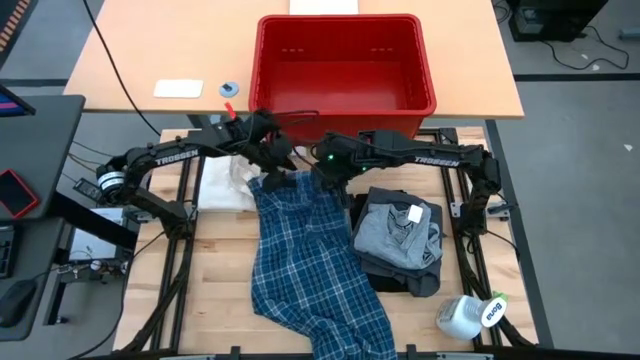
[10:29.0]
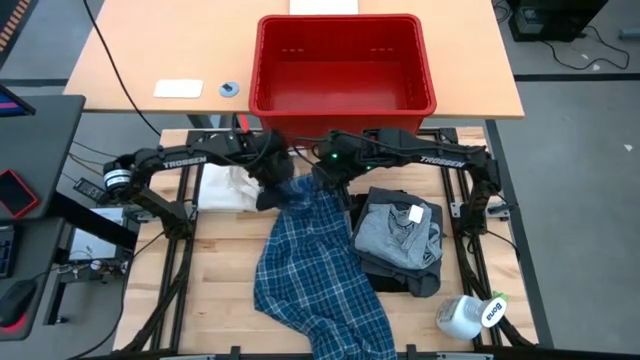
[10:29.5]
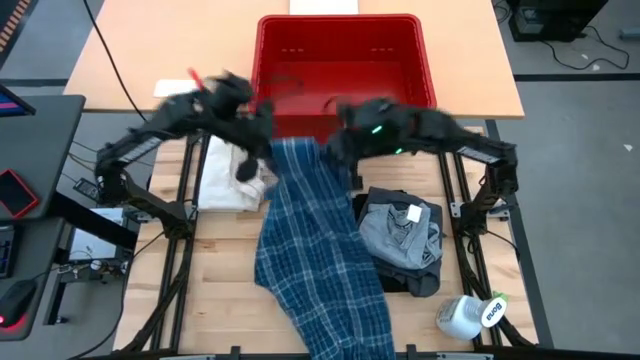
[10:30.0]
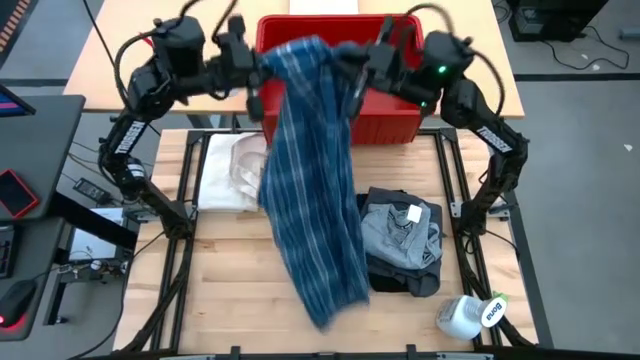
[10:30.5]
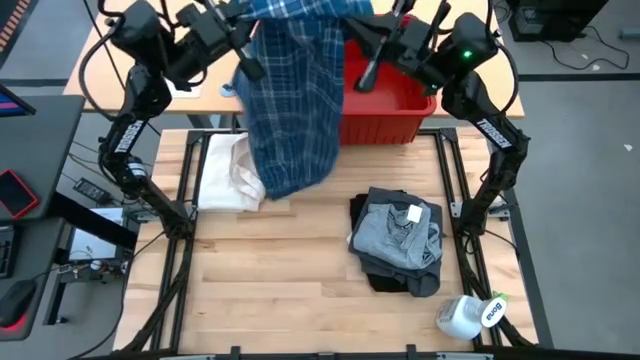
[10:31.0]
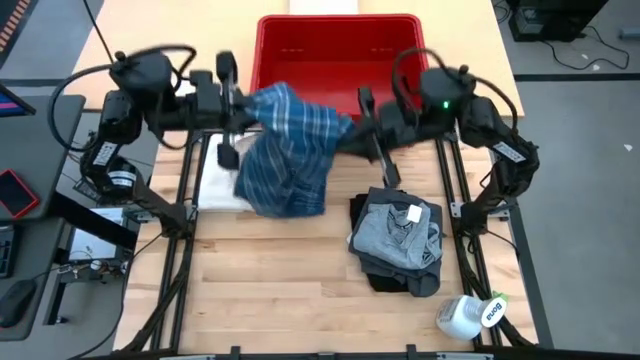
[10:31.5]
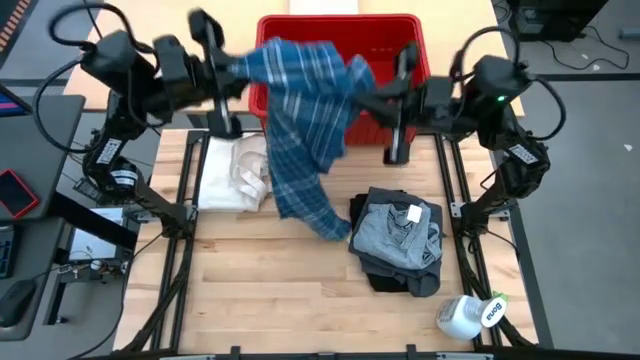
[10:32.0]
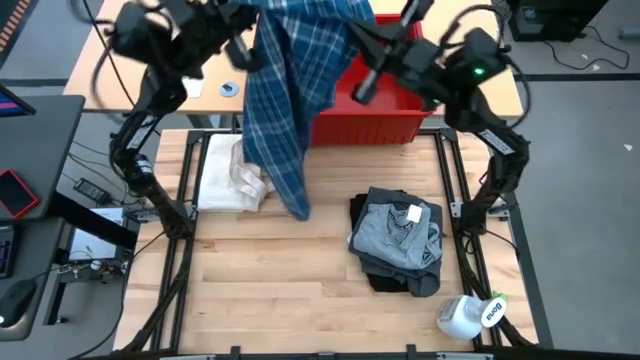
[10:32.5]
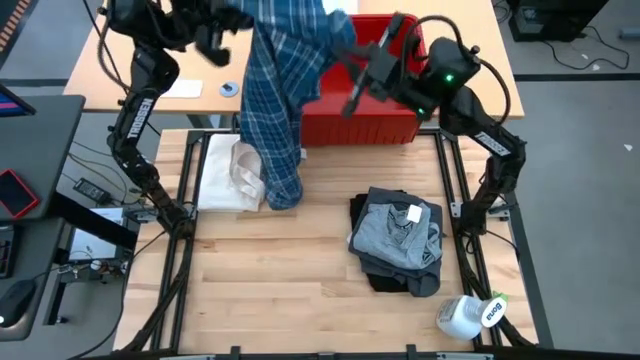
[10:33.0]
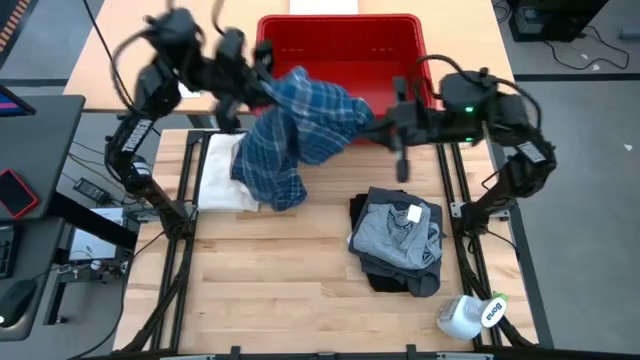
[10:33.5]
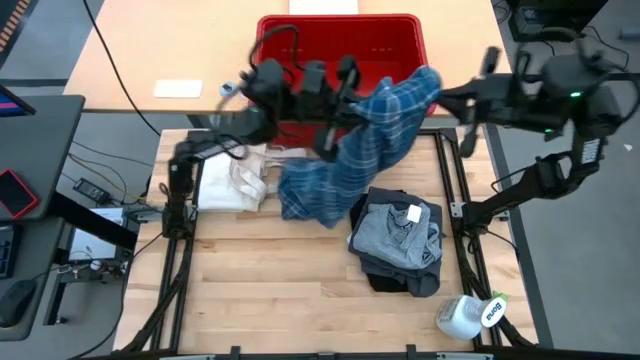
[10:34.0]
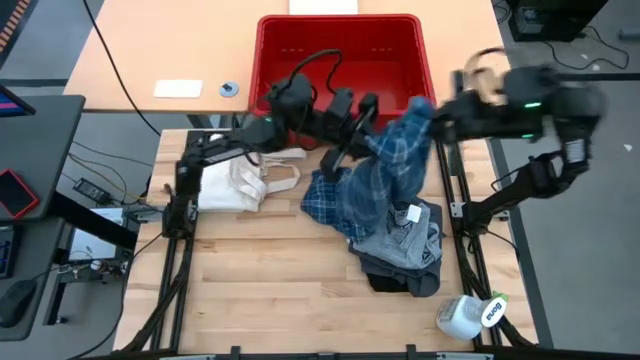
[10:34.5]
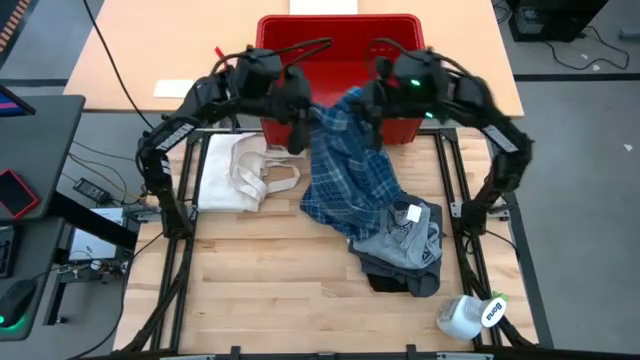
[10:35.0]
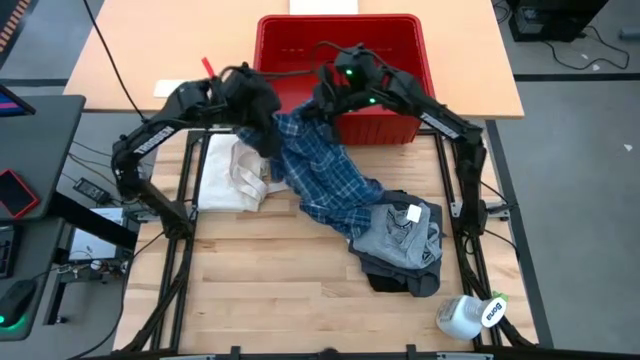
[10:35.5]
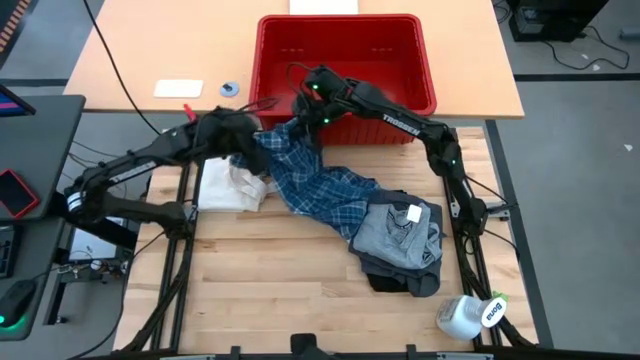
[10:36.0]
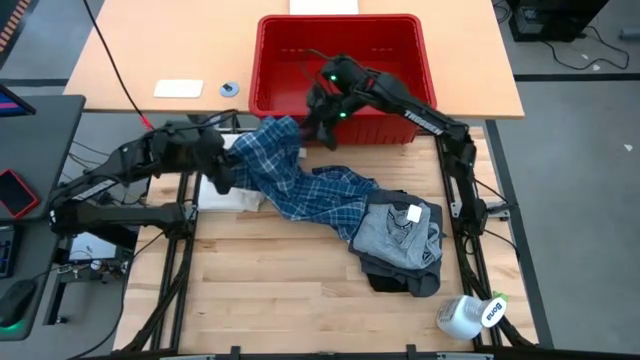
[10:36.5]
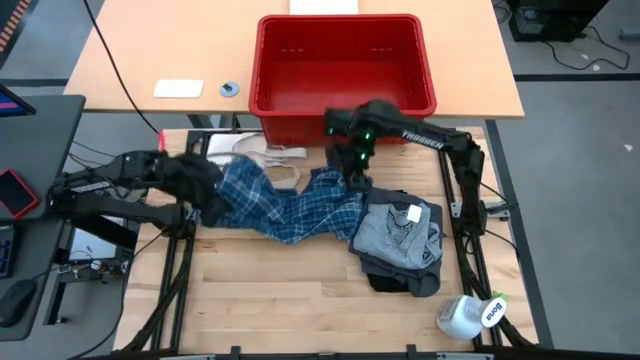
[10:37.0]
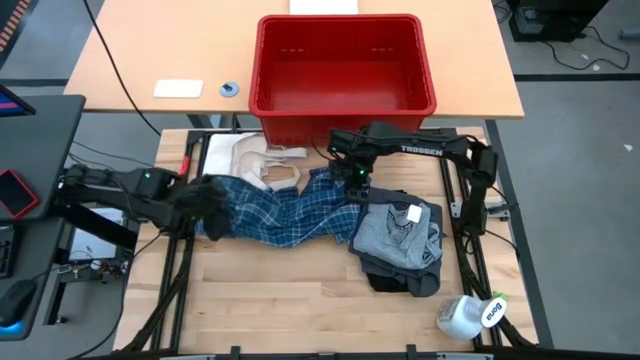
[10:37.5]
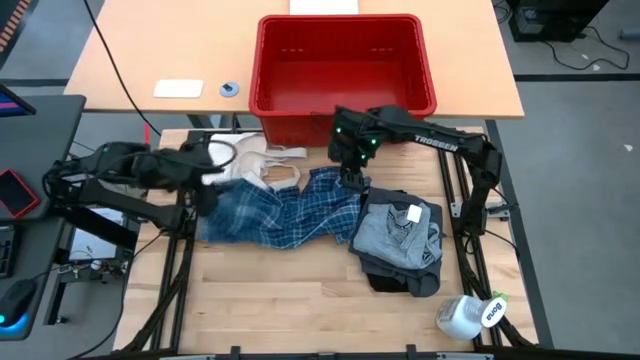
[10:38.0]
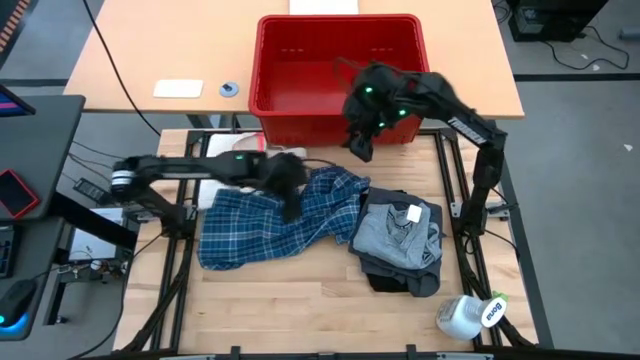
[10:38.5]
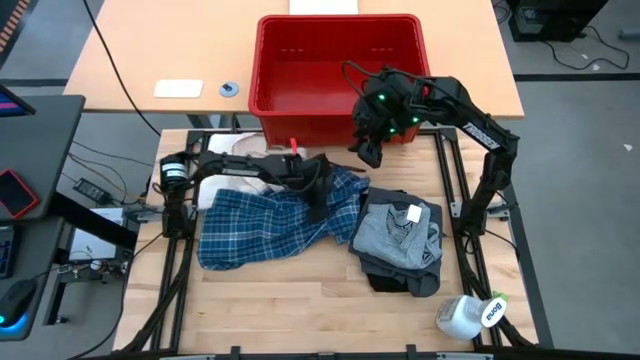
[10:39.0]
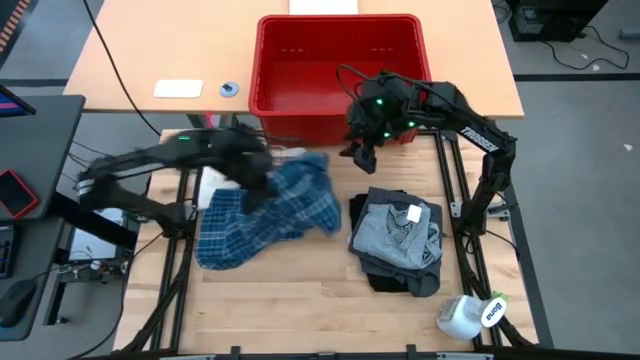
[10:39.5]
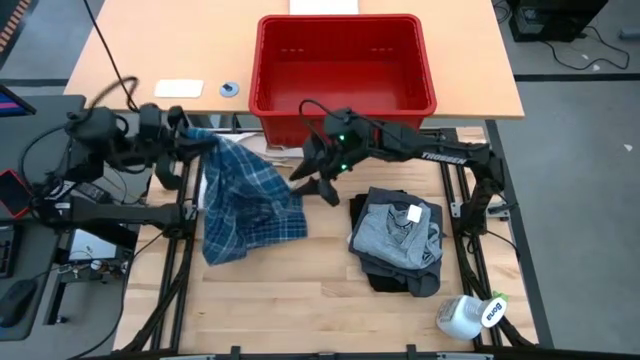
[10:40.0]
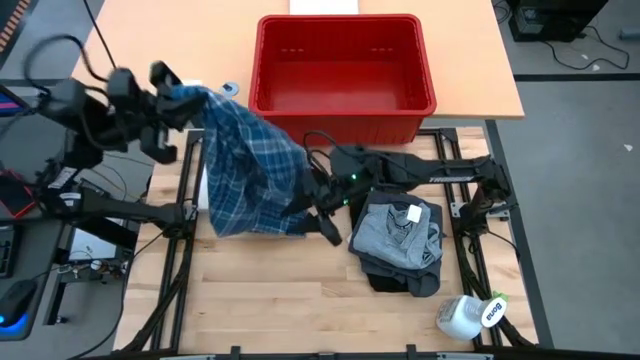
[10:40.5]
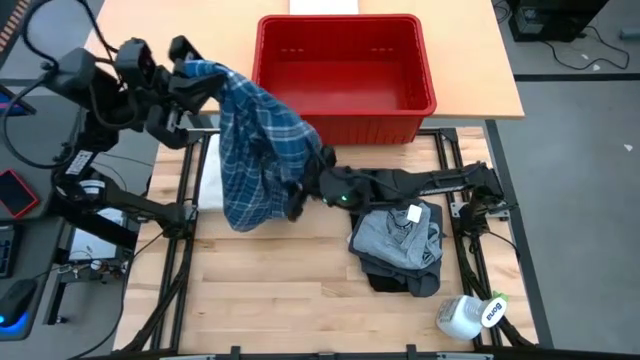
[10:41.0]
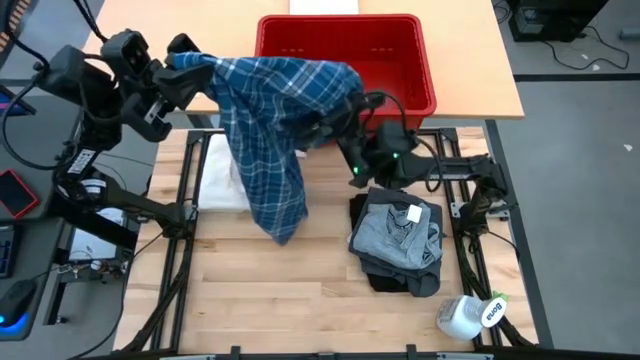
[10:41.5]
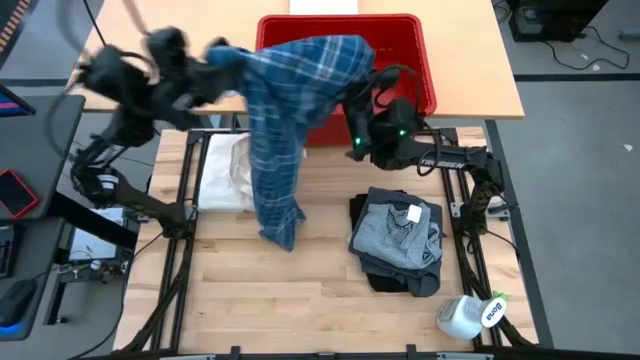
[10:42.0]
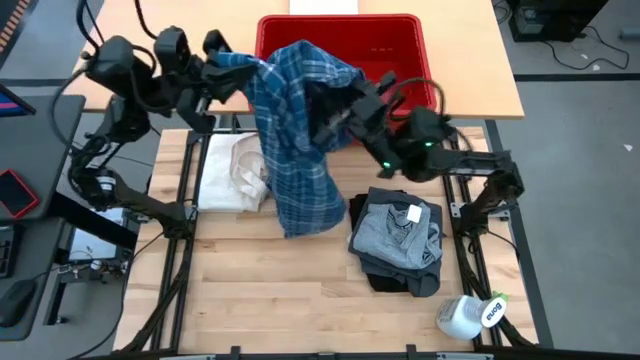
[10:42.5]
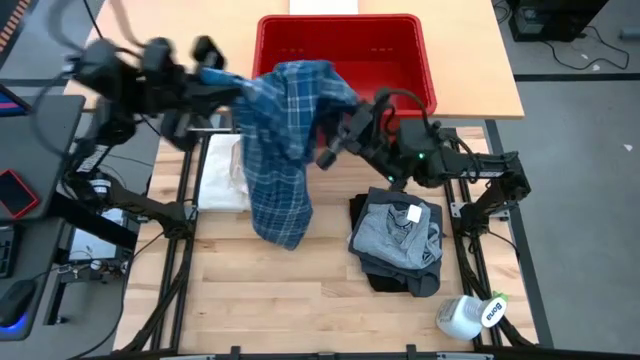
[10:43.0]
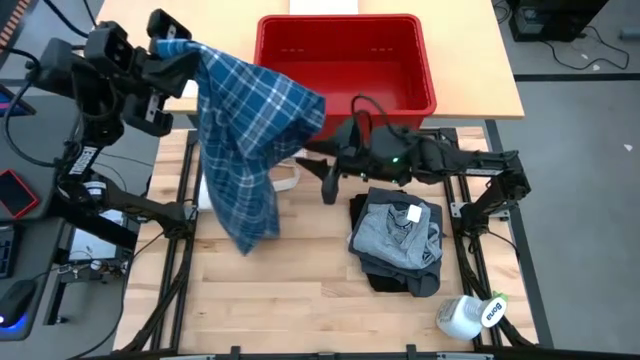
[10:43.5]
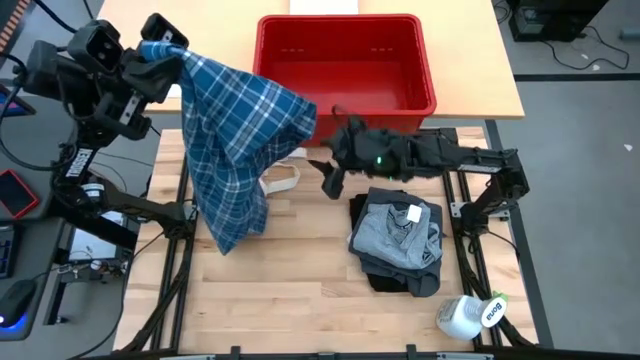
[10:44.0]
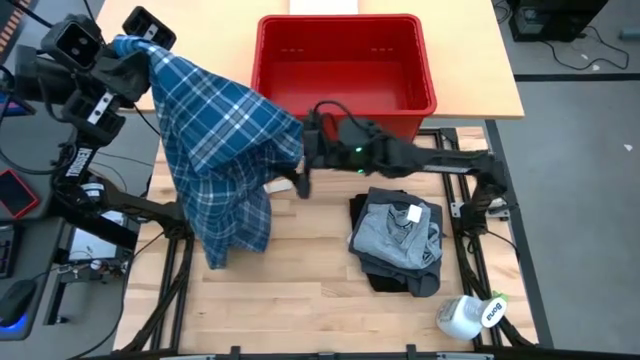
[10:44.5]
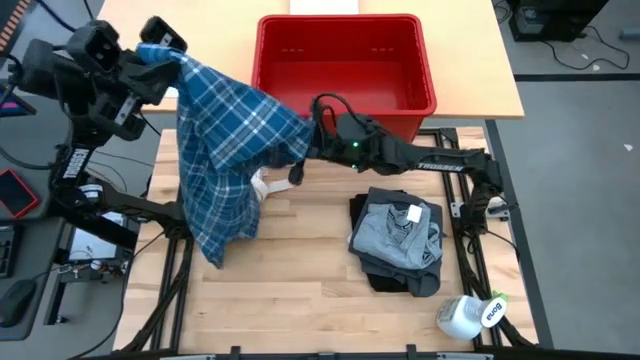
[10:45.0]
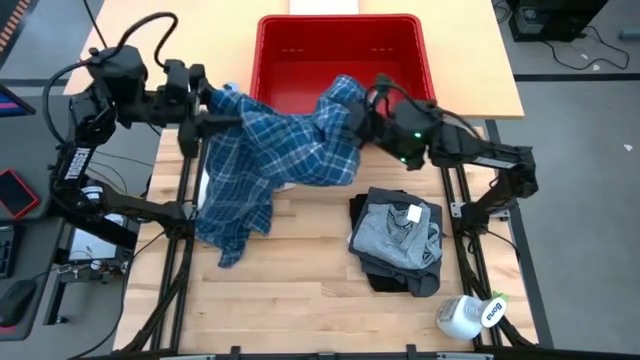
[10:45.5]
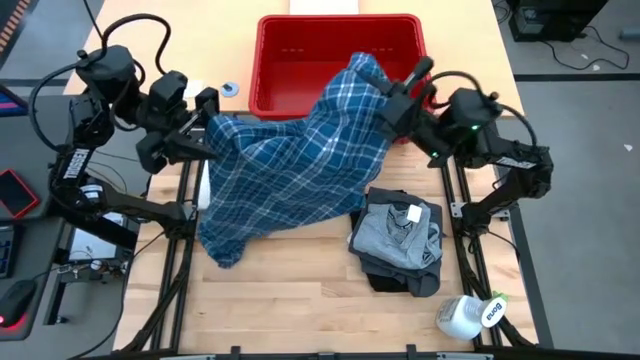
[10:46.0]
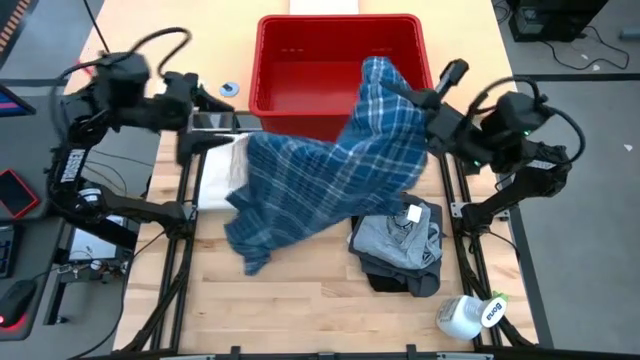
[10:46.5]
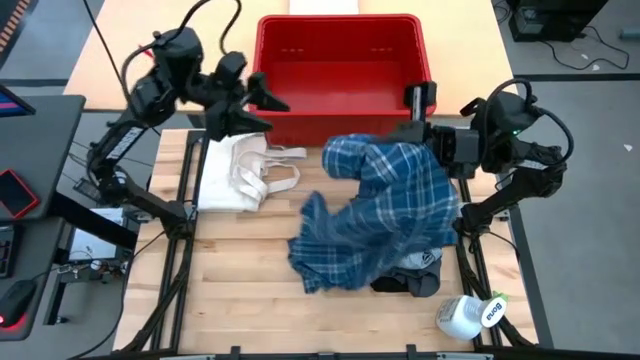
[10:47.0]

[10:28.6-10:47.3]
Task: Fold Laundry from Bin
Fold the blue checkered pants

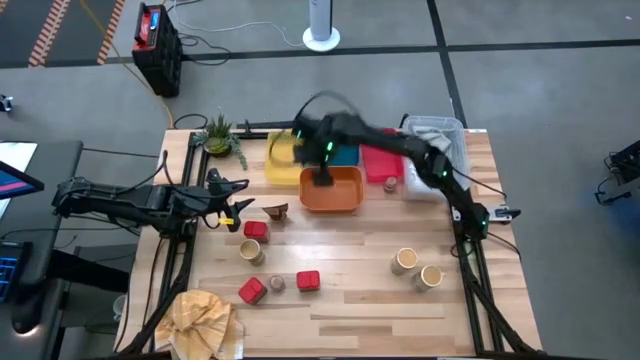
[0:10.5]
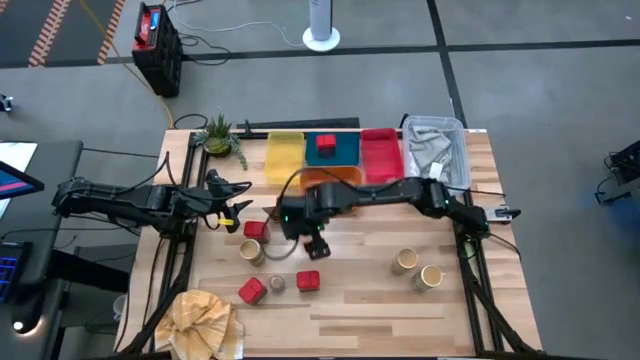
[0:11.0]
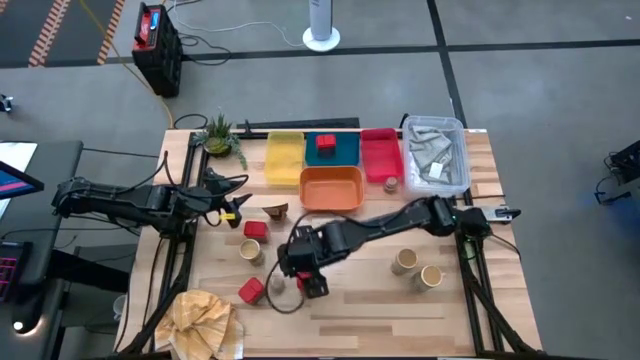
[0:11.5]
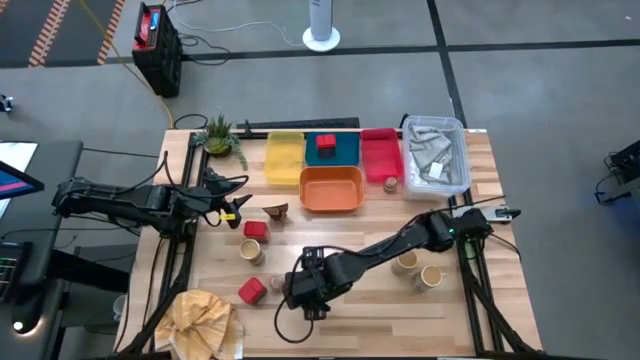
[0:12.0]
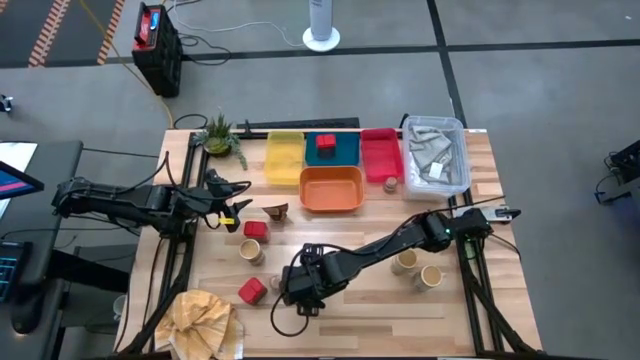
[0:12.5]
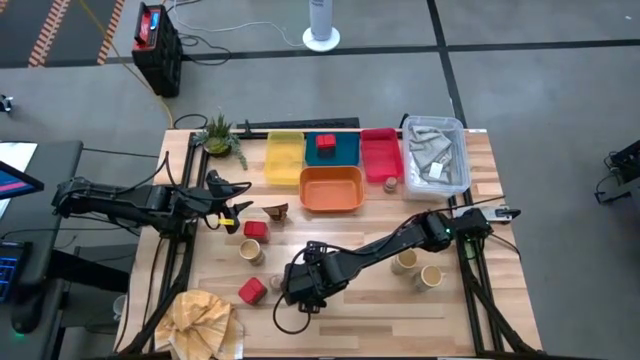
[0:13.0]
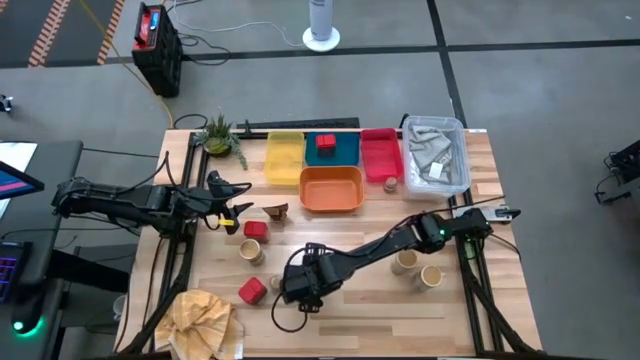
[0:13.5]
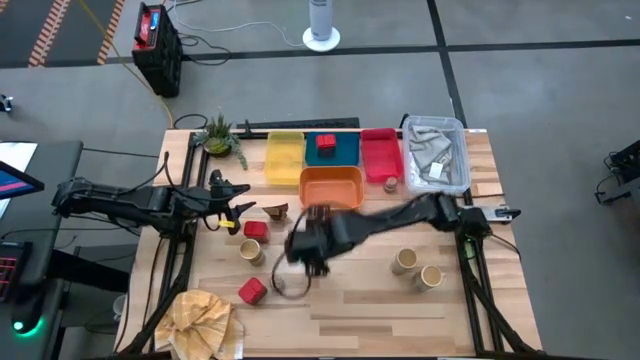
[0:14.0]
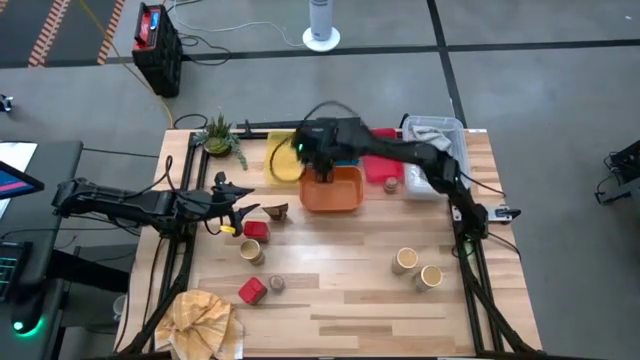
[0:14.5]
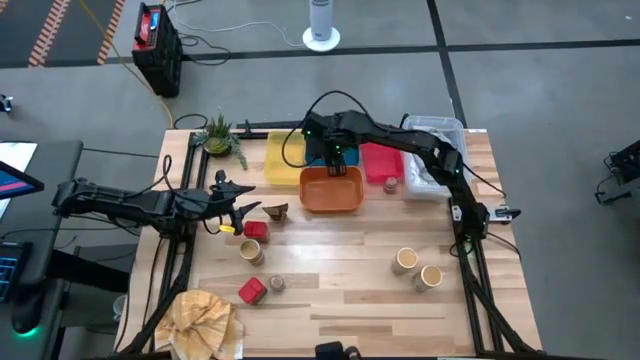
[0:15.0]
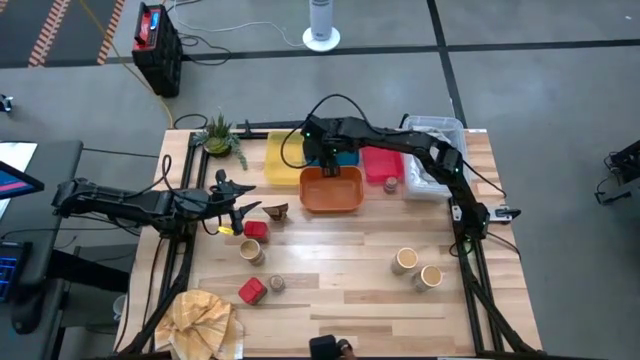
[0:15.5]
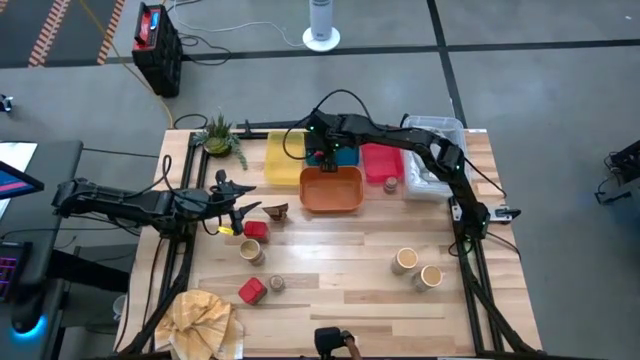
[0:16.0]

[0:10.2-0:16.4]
Task: Sort spices by type
Put the red seasoning can into the blue bin
